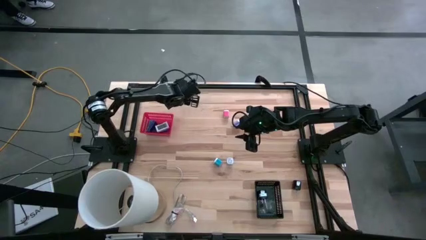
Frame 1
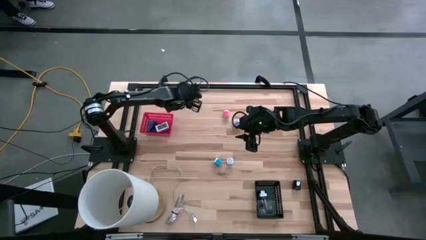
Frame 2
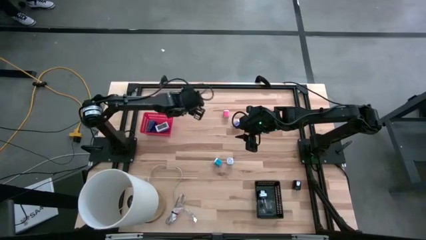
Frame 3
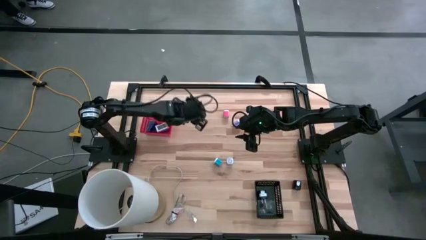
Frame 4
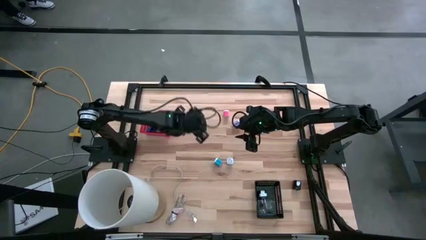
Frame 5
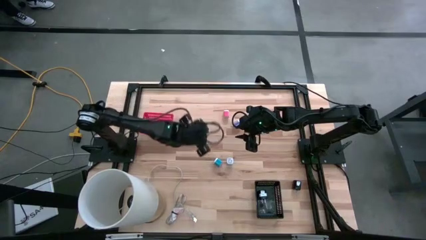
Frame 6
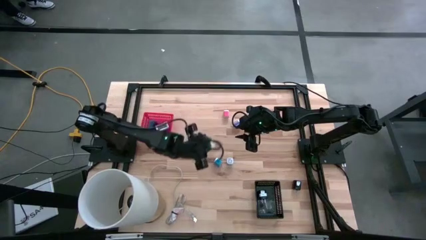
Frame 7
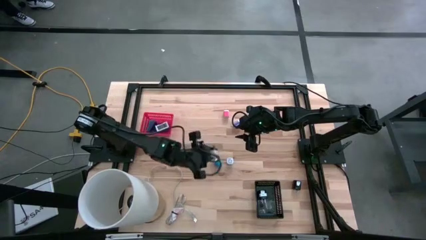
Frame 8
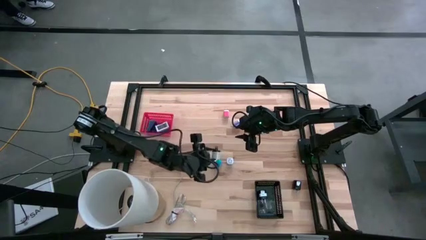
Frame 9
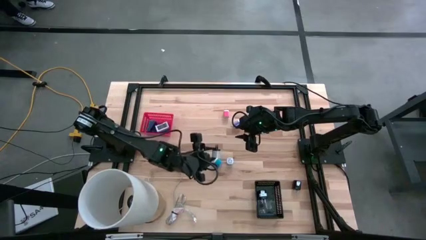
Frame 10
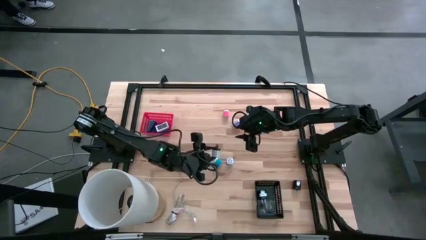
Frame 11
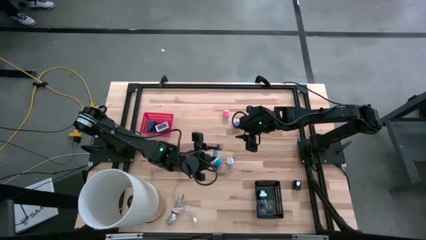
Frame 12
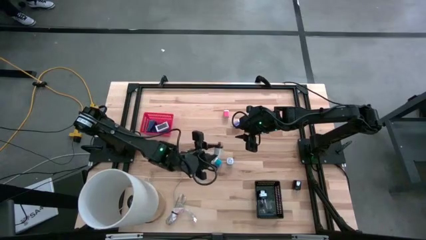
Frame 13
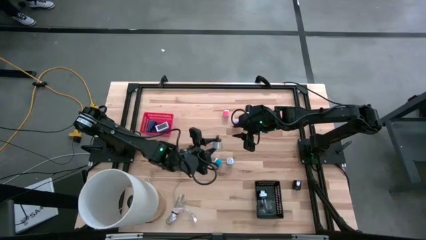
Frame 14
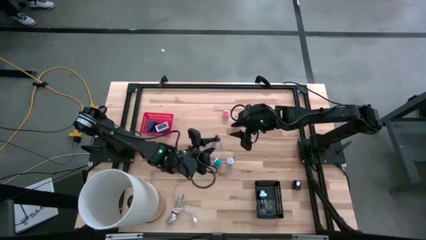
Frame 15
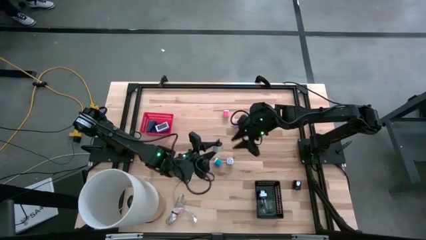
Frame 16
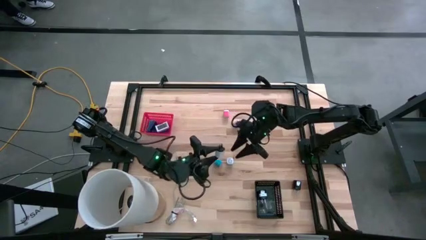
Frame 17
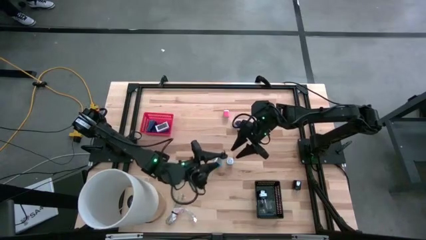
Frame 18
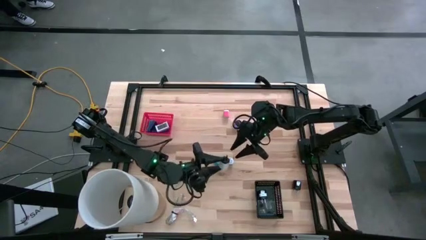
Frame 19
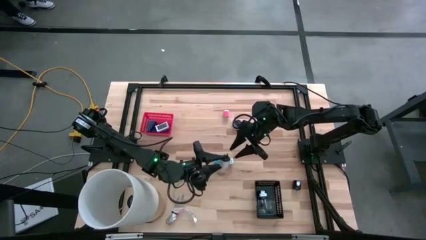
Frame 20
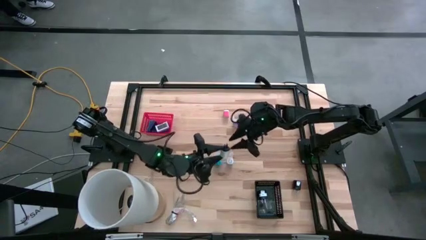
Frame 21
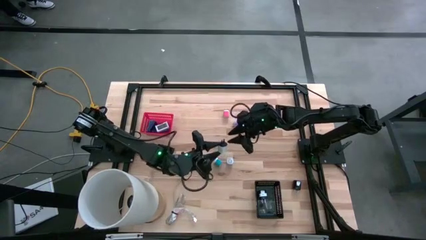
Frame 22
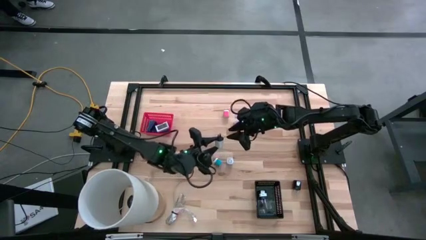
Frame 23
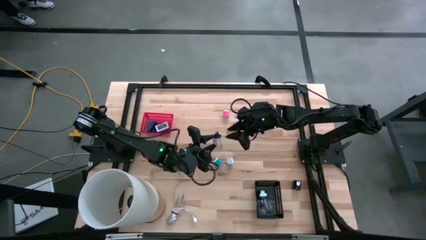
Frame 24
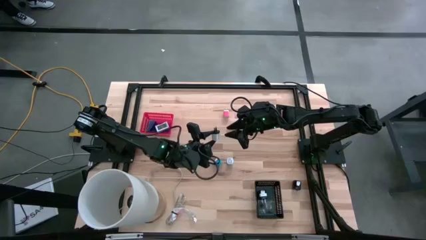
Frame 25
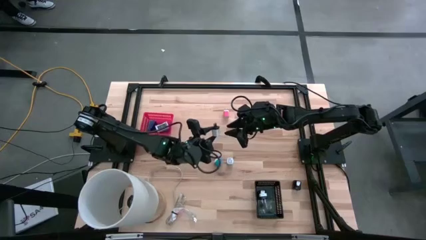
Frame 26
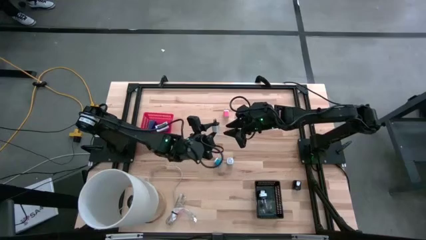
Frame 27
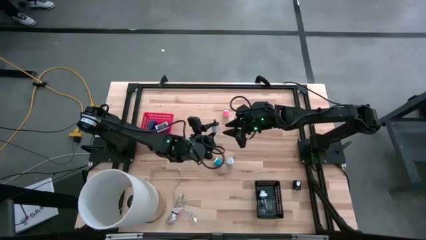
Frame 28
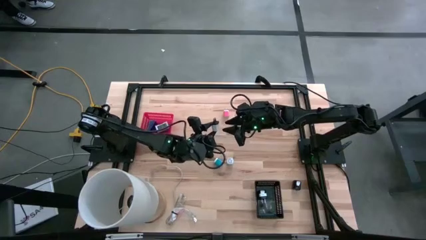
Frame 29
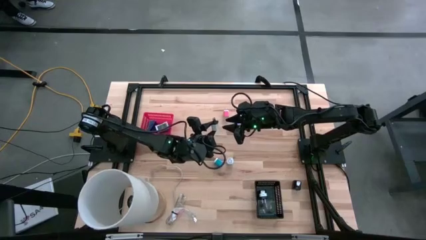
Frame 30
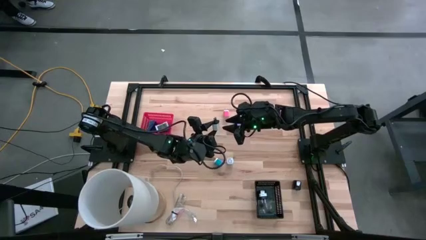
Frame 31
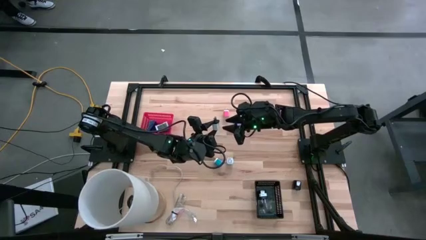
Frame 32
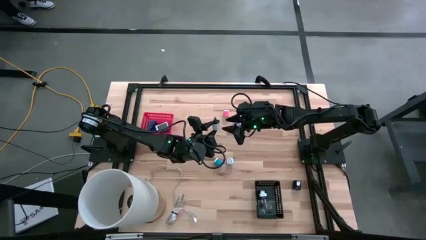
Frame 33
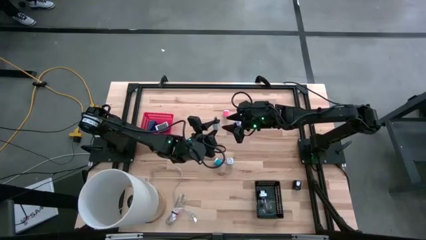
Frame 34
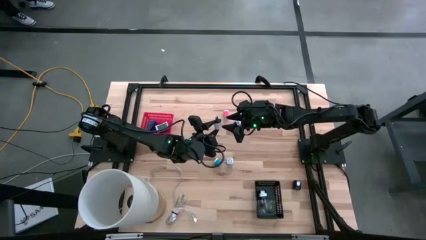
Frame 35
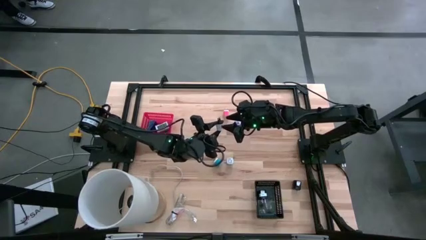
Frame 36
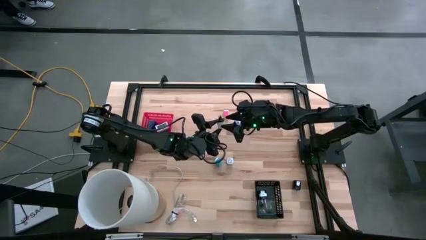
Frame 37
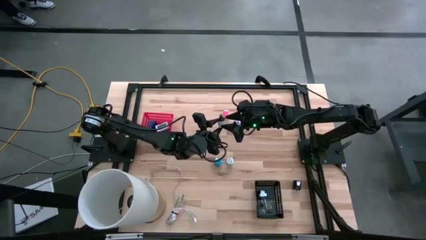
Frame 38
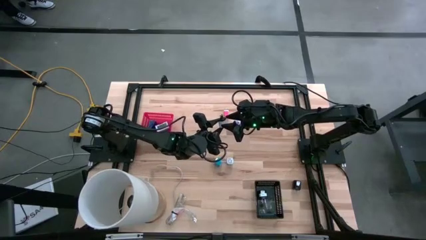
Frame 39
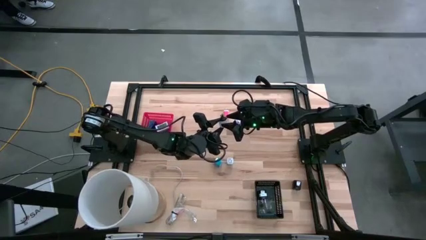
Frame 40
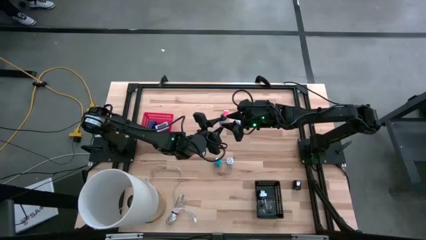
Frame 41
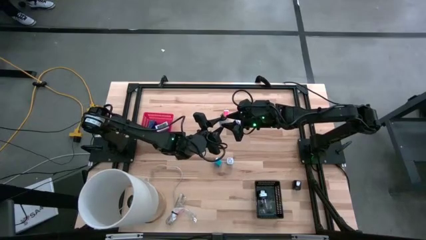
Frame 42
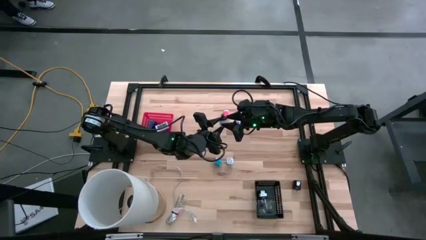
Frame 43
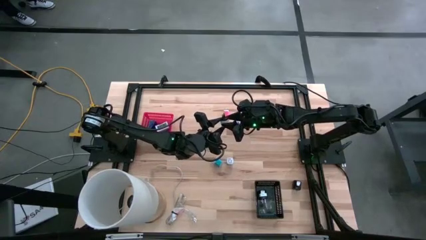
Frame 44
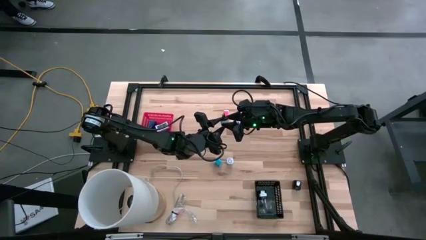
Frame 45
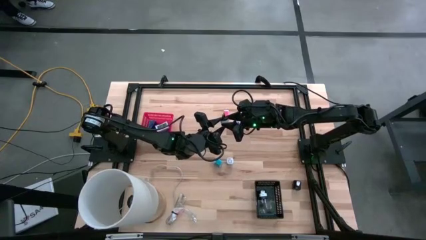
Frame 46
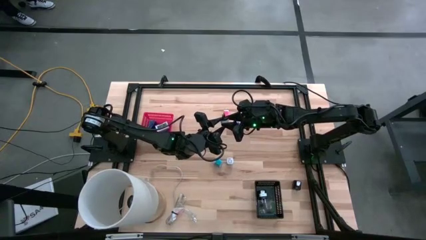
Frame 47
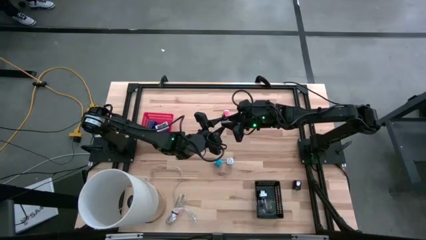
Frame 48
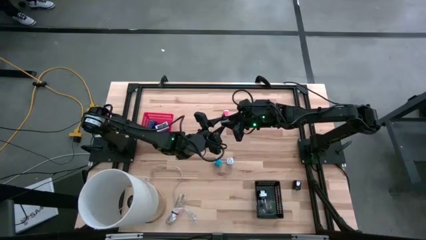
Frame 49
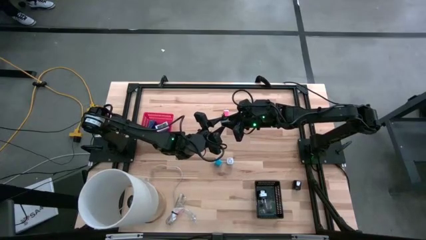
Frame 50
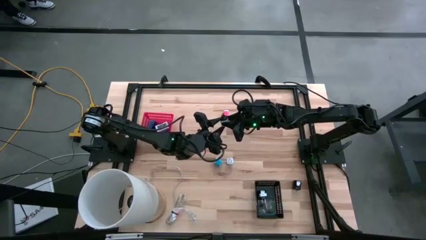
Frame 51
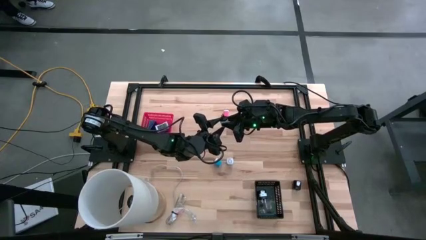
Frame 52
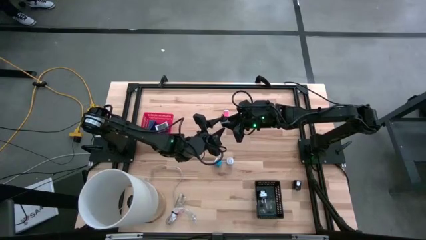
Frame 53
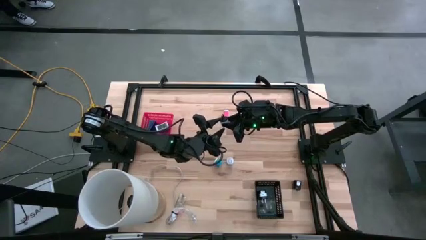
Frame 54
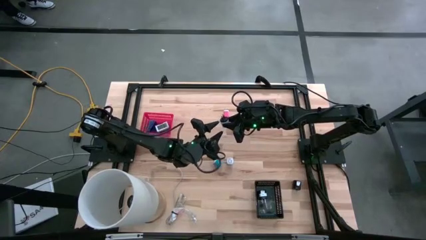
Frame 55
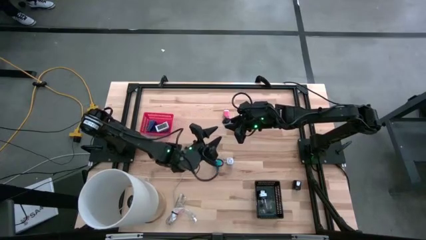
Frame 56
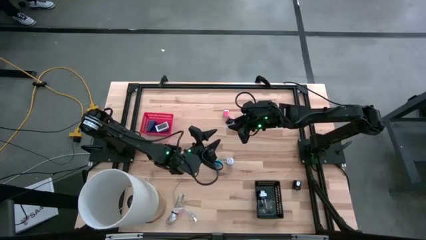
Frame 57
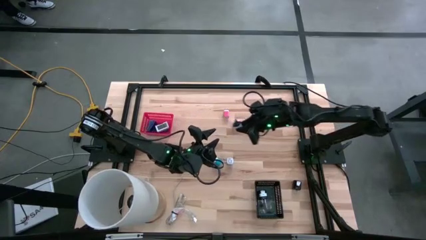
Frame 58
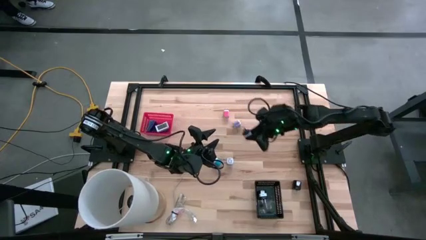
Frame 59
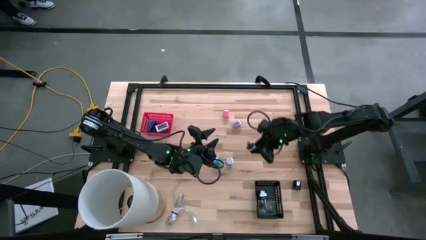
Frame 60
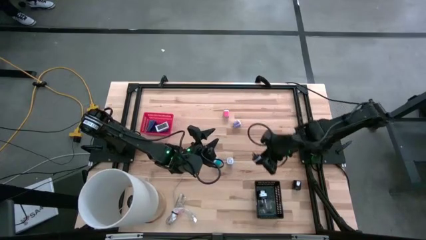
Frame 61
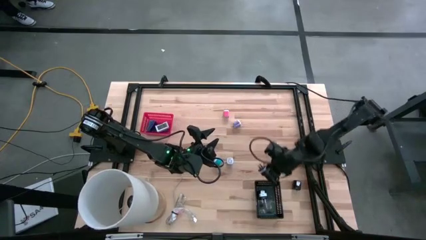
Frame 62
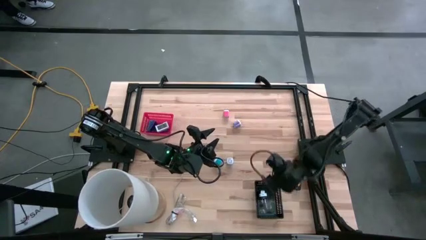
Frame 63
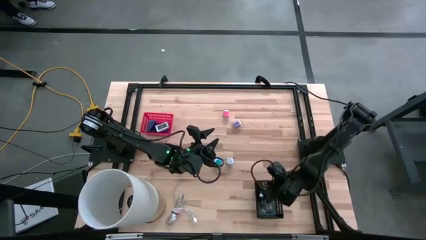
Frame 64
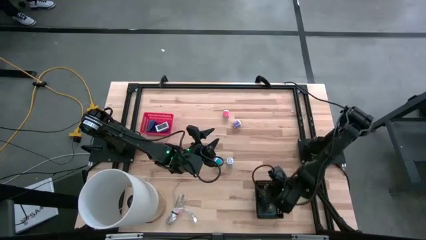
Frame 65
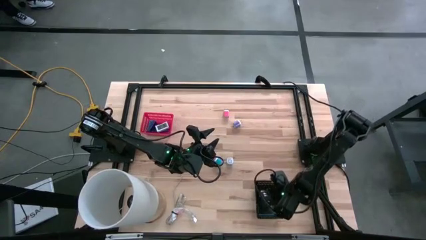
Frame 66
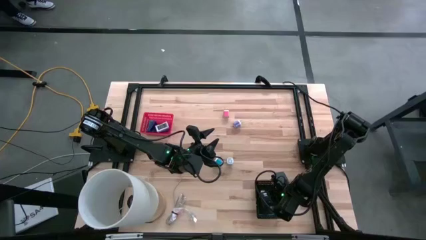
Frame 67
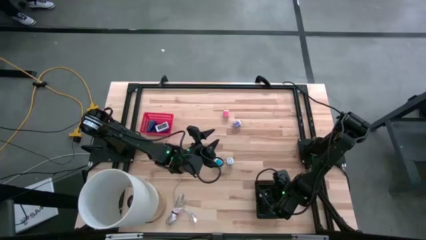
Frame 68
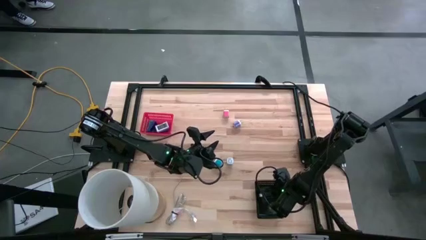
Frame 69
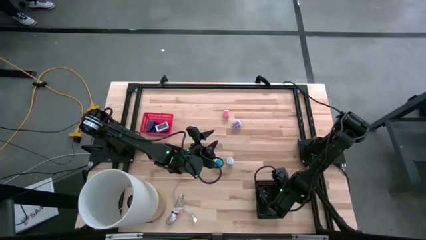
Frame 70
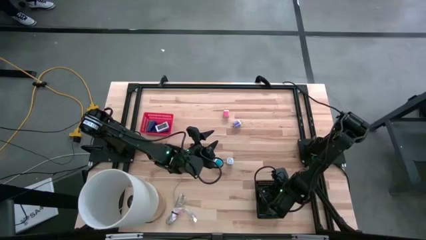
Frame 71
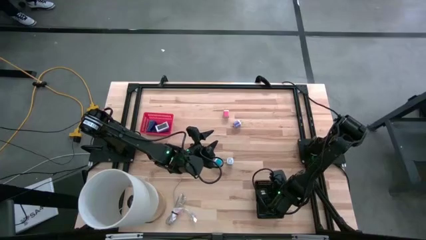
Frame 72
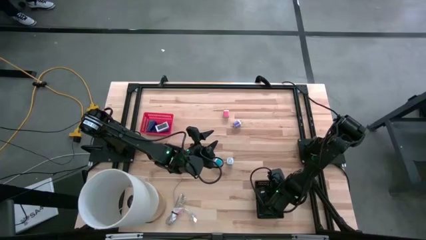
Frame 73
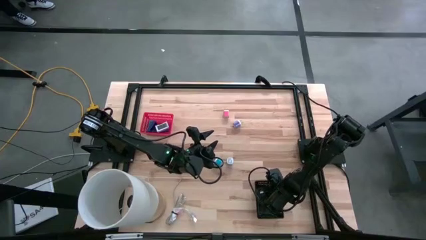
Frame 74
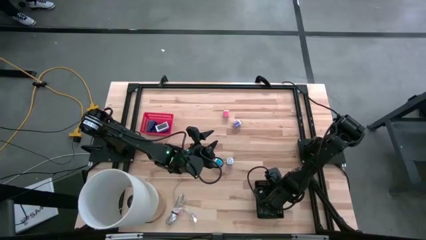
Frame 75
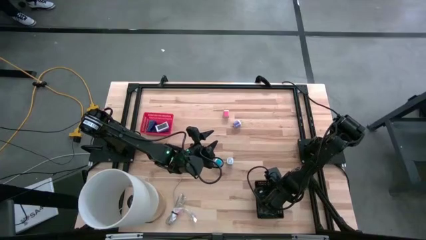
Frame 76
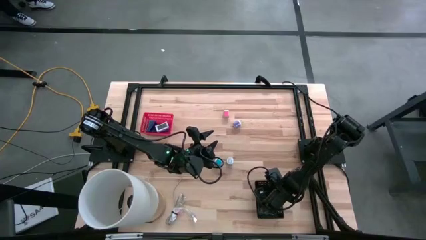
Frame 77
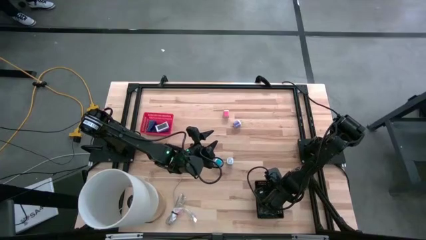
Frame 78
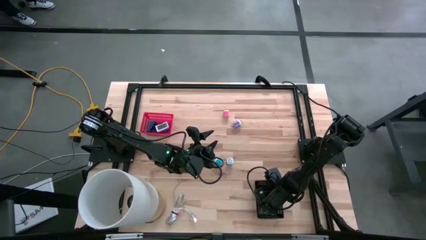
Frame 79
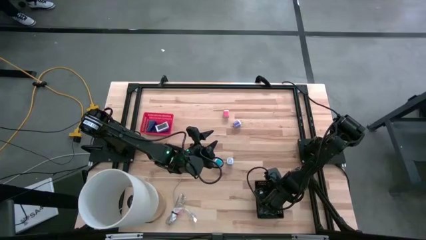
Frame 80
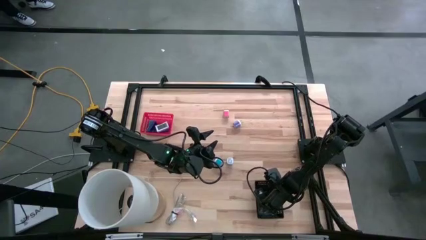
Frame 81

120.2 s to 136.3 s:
Task: Pick & Place Office items
Put the white charger adapter into the black bin
